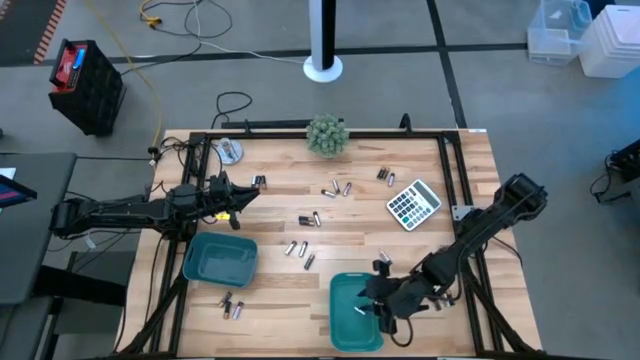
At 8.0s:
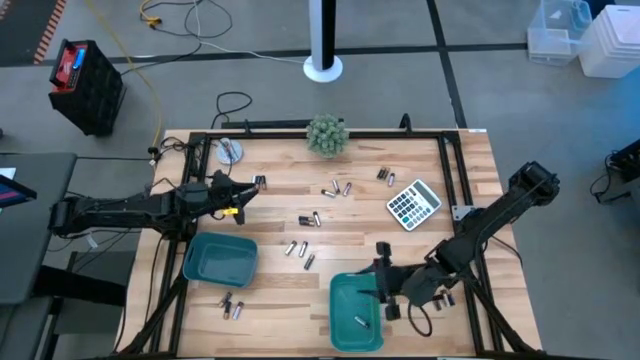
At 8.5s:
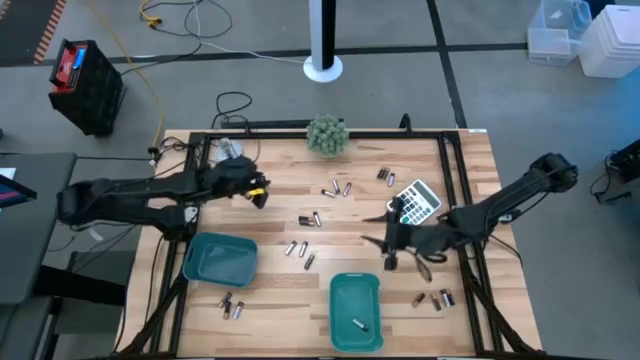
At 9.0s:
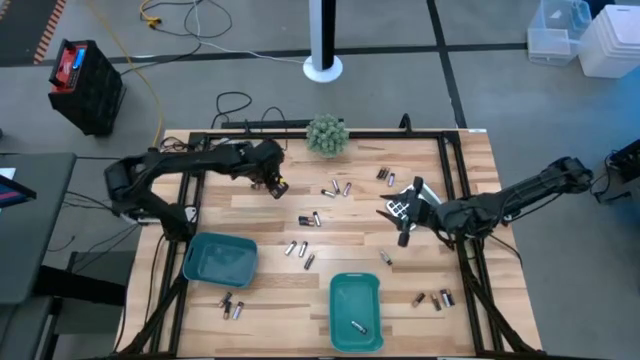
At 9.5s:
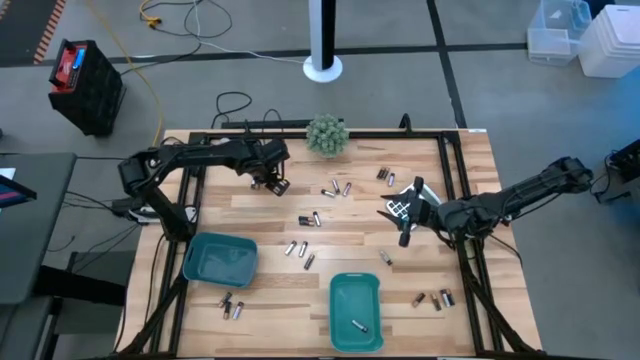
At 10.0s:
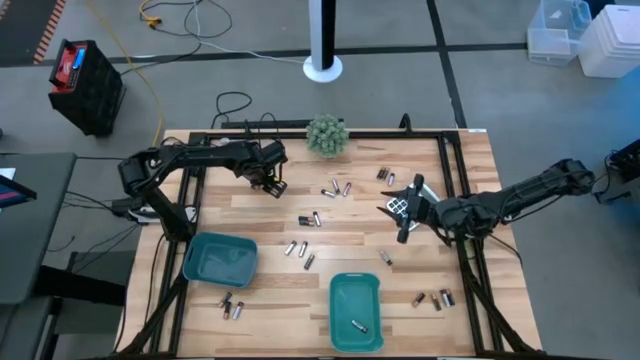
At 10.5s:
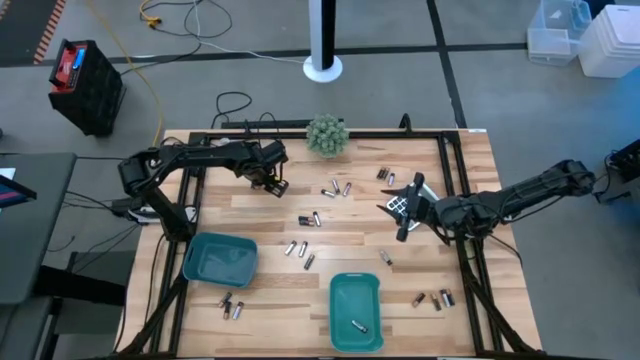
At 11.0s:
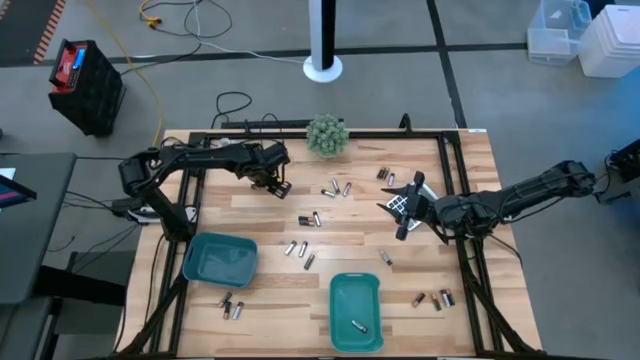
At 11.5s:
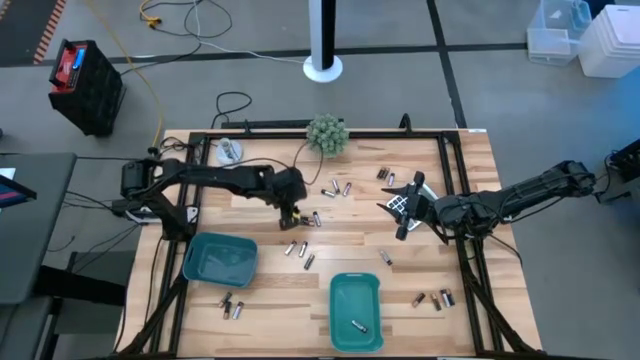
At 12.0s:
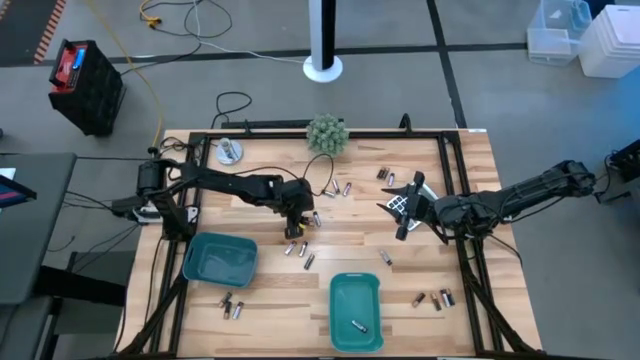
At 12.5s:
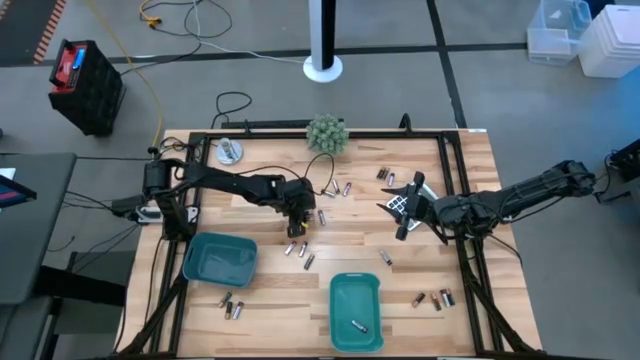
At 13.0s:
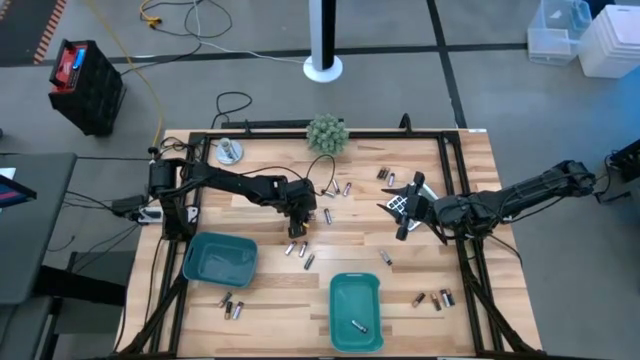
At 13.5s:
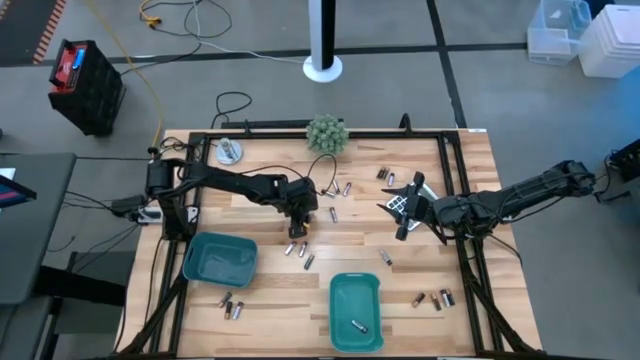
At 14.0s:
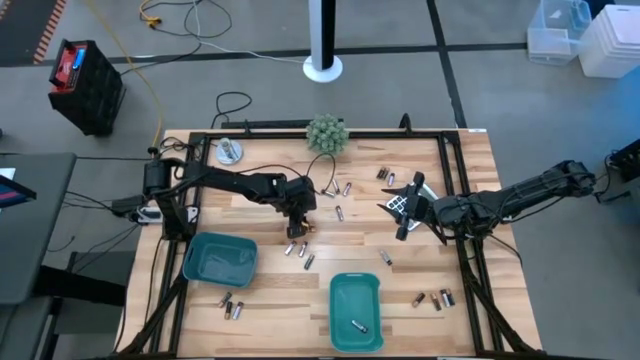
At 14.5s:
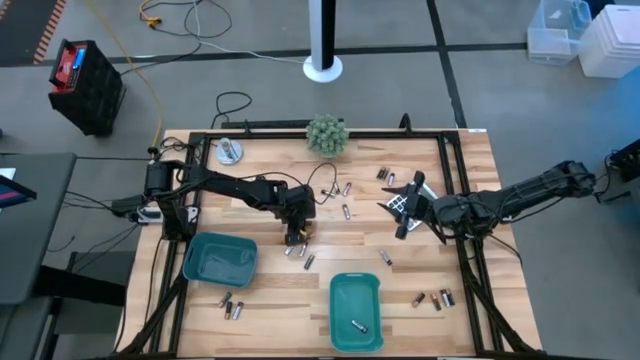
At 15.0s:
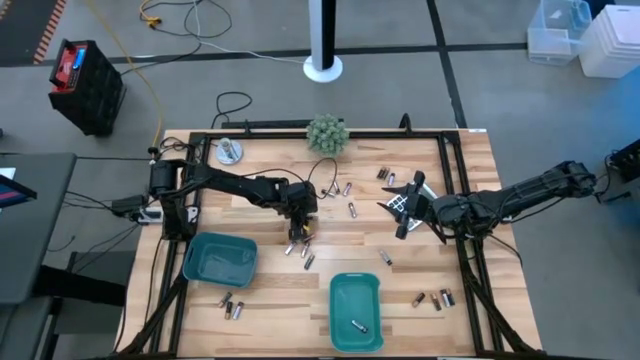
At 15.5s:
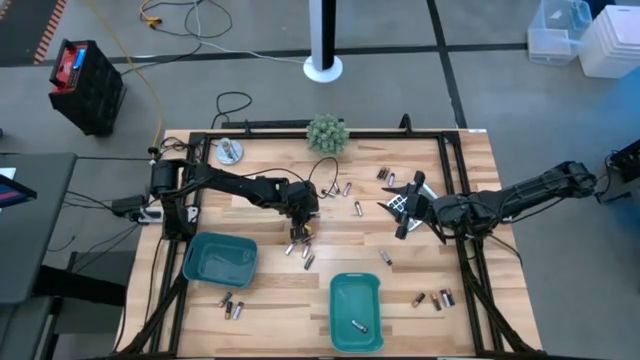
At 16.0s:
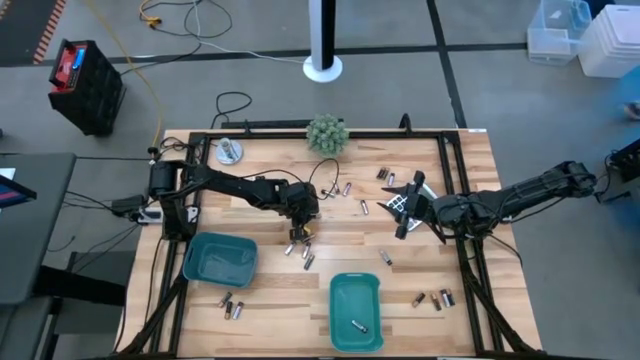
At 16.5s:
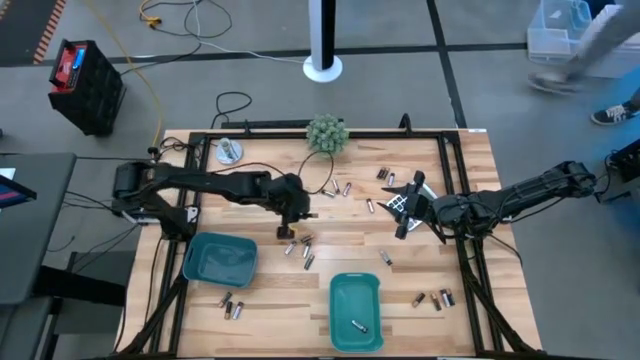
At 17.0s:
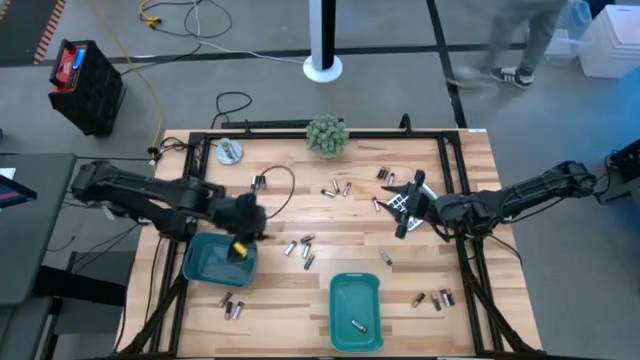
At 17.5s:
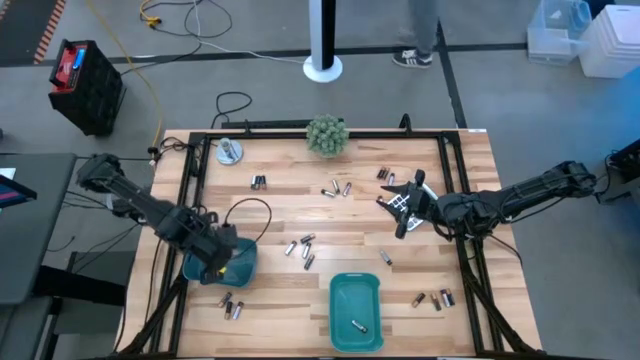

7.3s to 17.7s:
Task: Sort batteries
Put the black battery into the blue bin

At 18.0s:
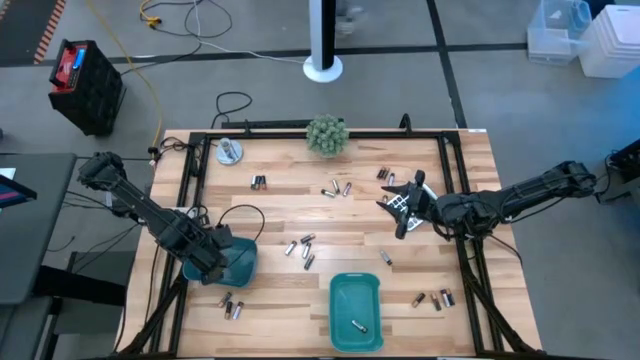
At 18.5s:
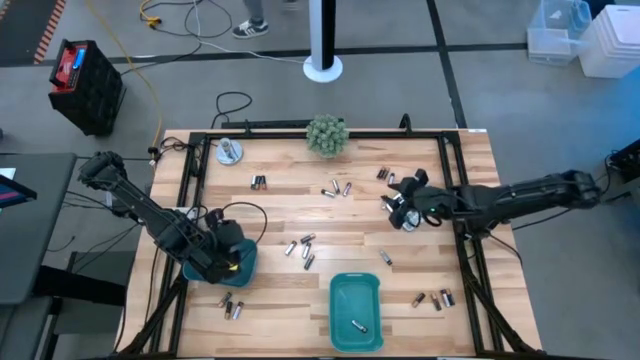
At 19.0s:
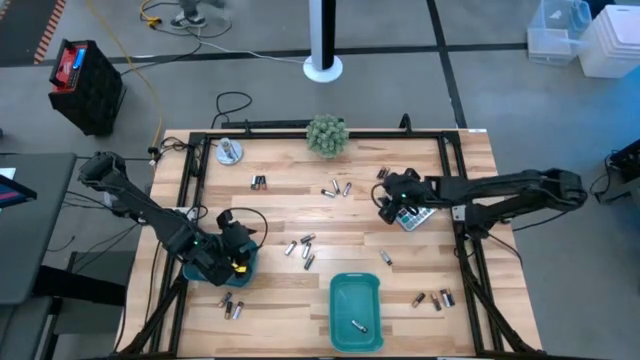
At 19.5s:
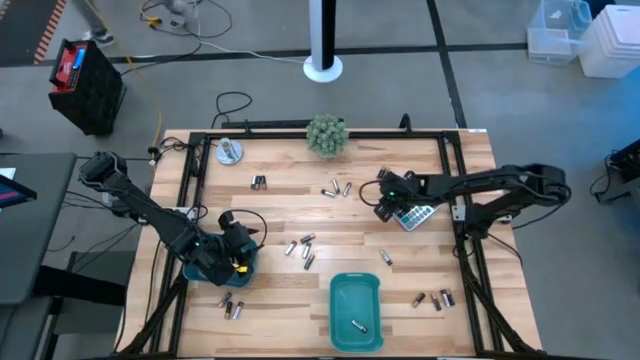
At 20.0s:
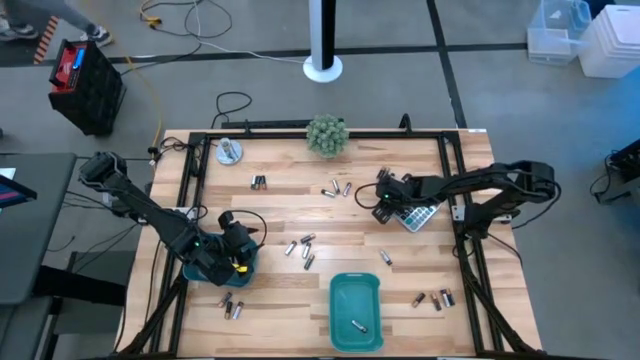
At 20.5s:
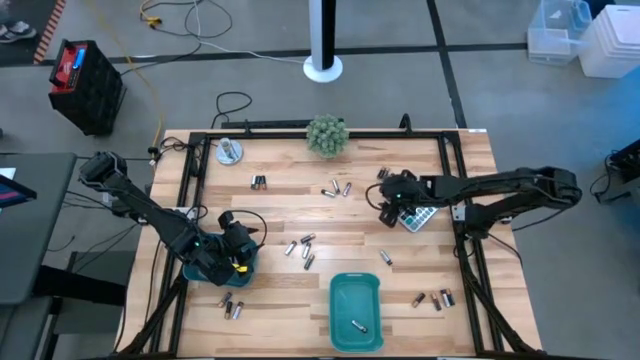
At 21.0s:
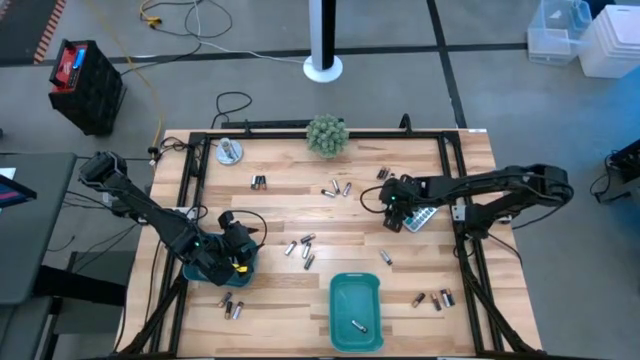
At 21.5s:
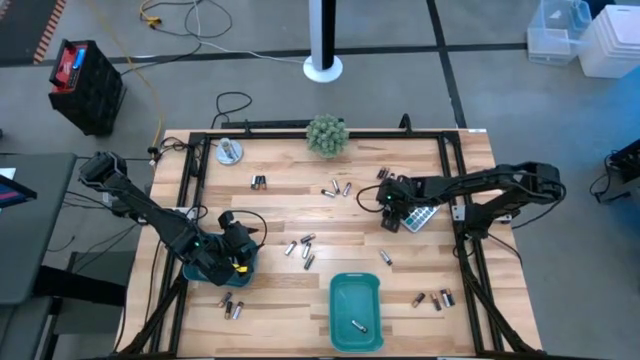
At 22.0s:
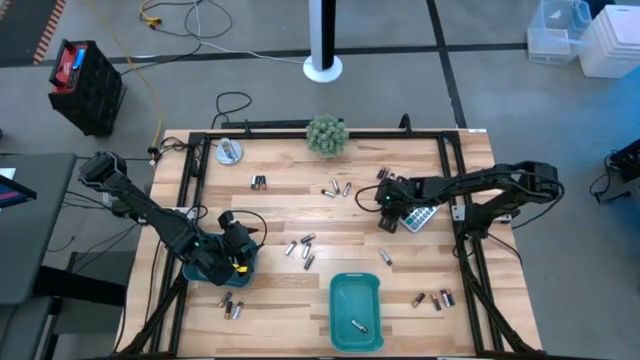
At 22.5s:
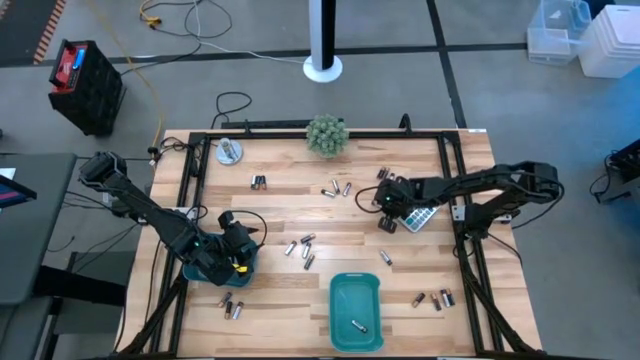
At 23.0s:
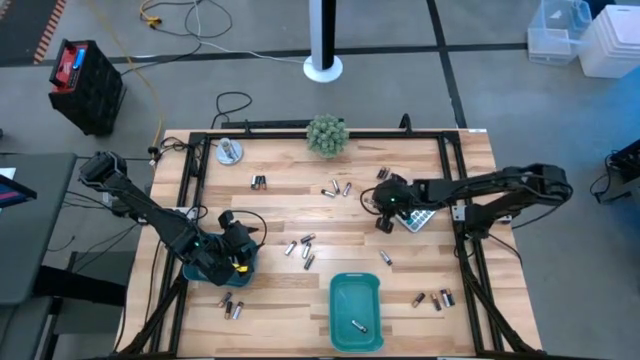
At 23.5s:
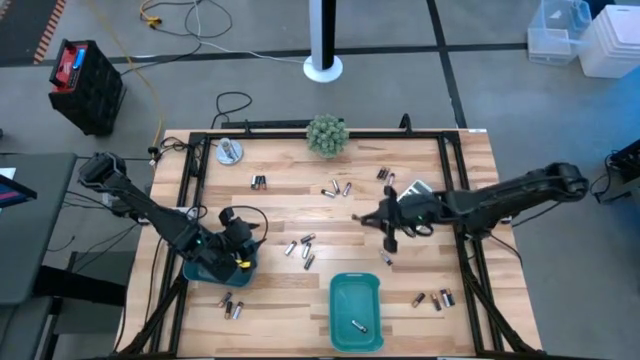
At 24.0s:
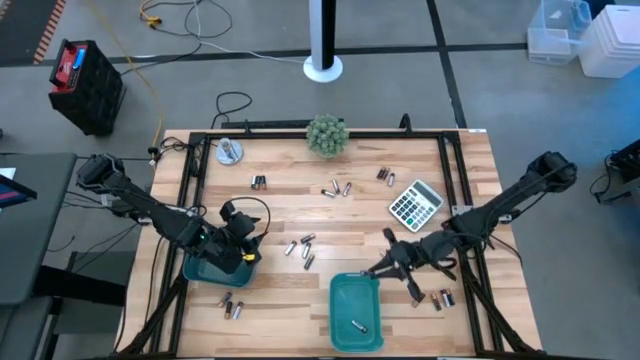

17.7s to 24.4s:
Put the silver battery into the green bin

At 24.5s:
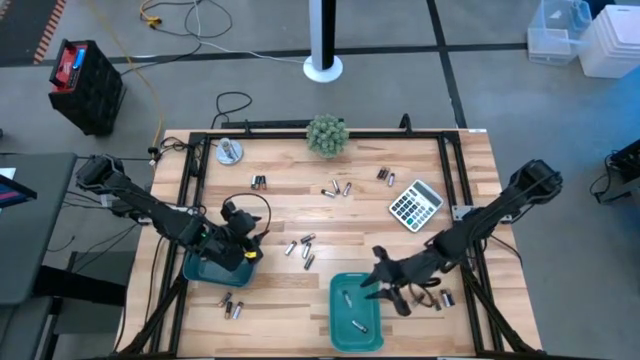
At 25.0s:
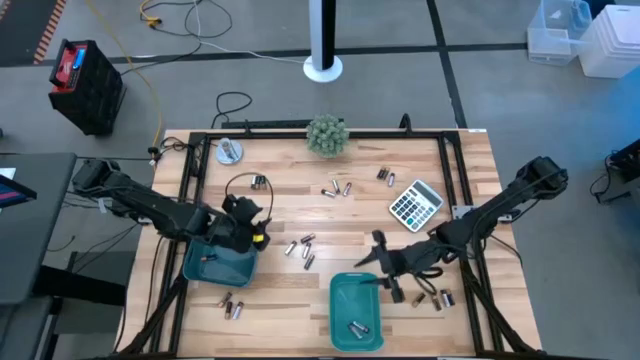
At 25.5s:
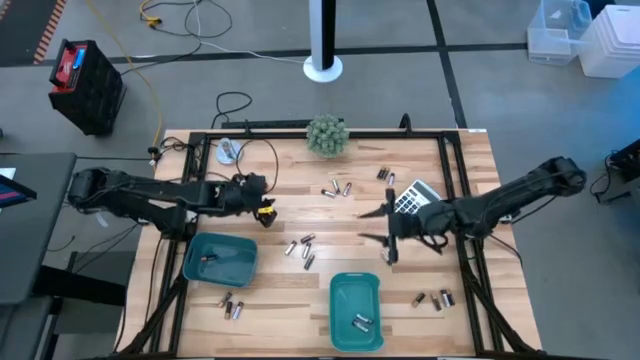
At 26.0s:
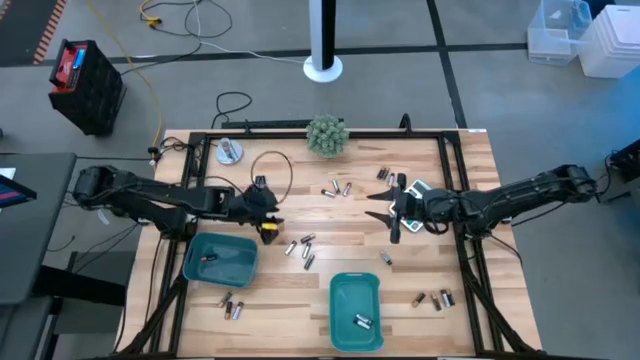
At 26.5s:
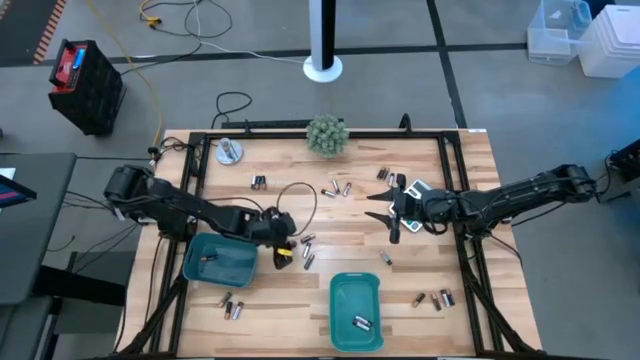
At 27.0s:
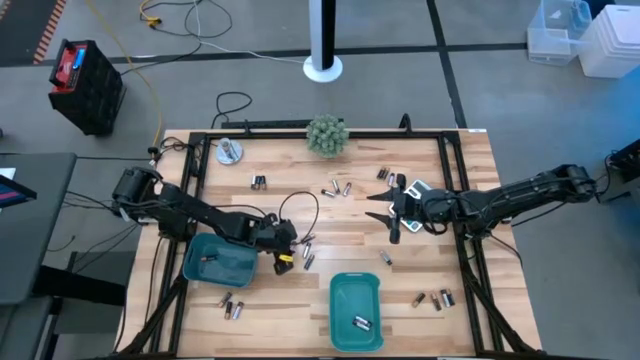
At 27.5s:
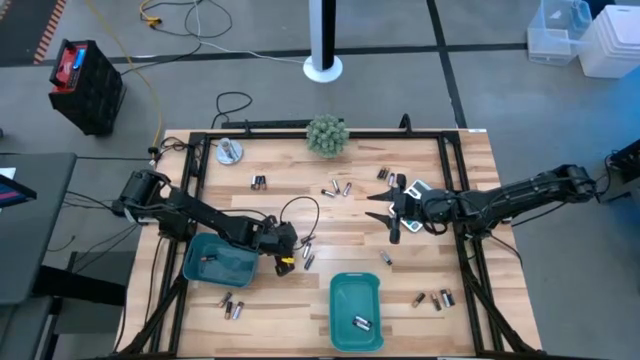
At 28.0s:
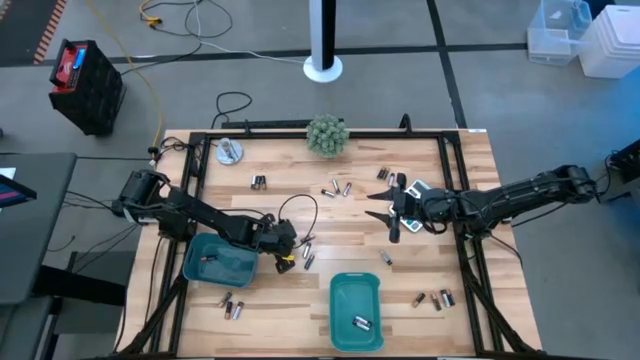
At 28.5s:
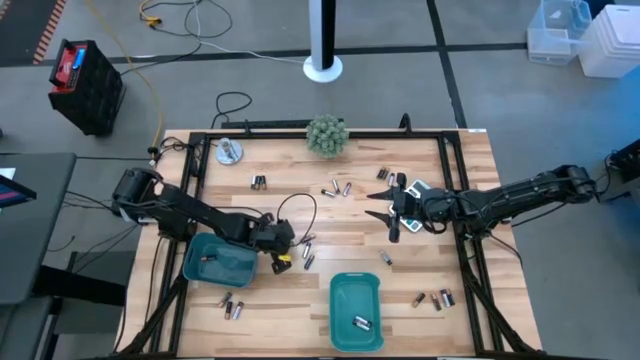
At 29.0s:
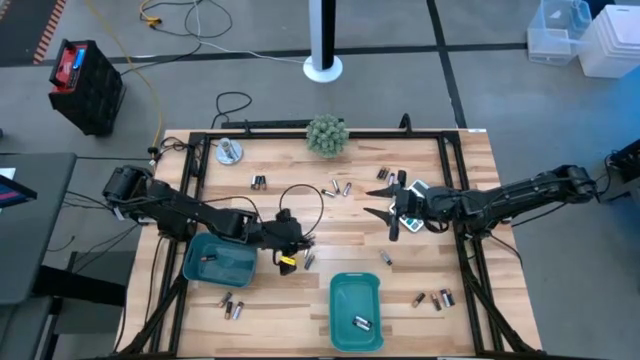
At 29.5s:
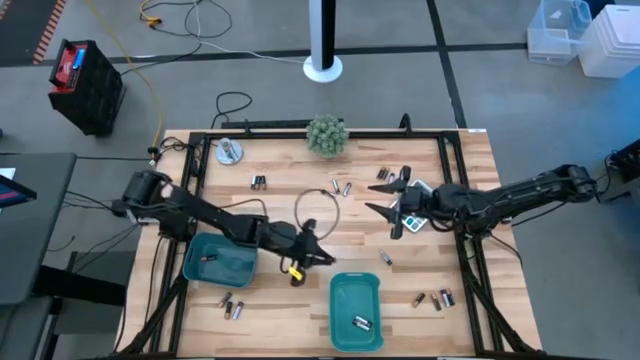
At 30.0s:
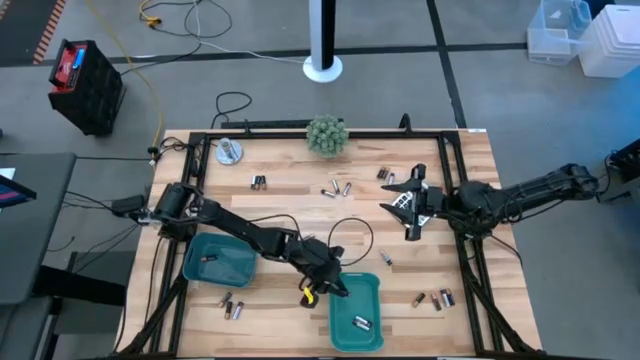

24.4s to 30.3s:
Put the silver battery into the green bin
